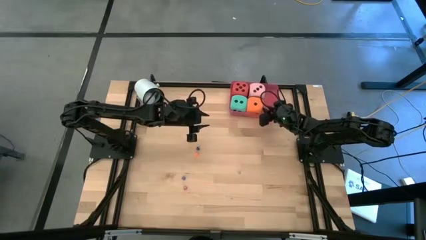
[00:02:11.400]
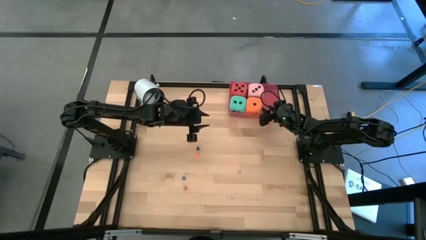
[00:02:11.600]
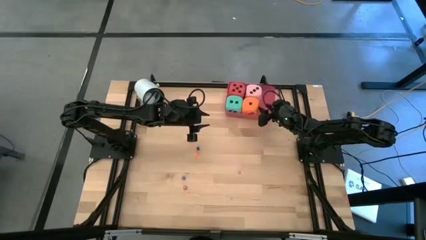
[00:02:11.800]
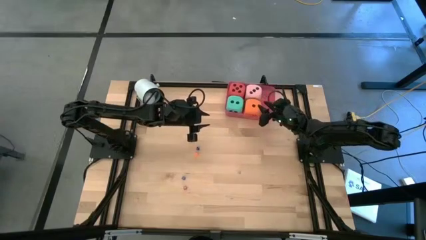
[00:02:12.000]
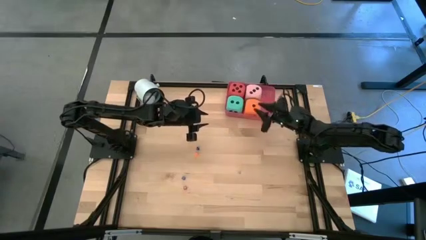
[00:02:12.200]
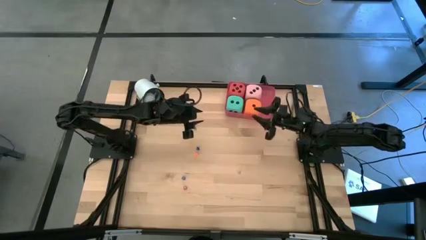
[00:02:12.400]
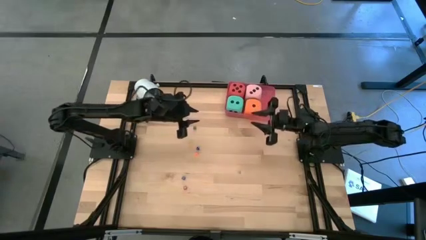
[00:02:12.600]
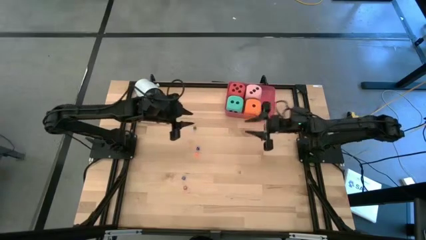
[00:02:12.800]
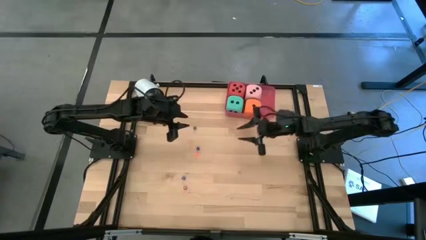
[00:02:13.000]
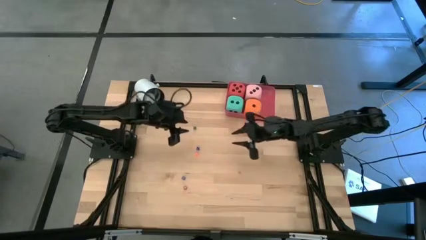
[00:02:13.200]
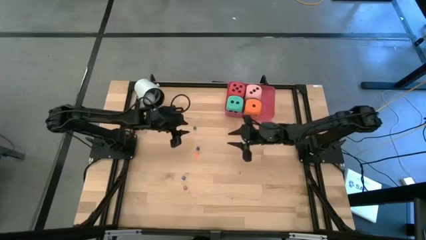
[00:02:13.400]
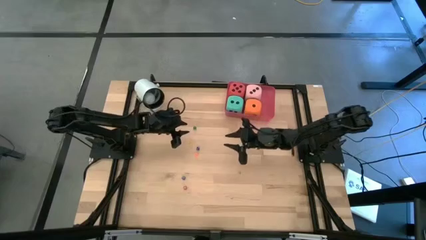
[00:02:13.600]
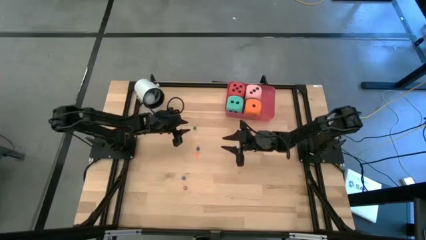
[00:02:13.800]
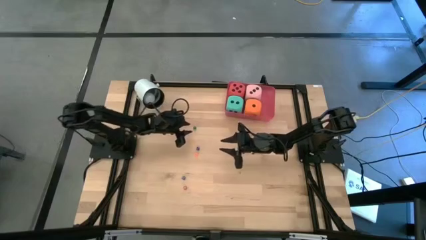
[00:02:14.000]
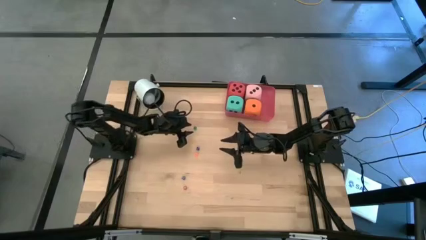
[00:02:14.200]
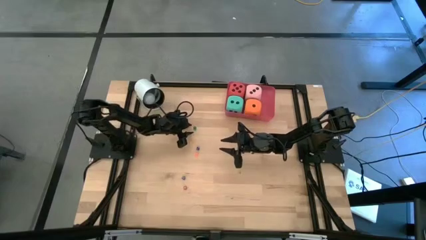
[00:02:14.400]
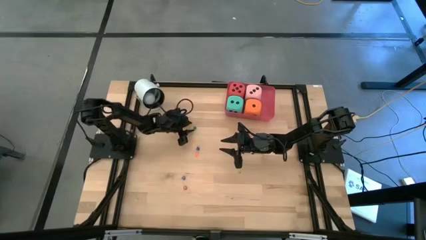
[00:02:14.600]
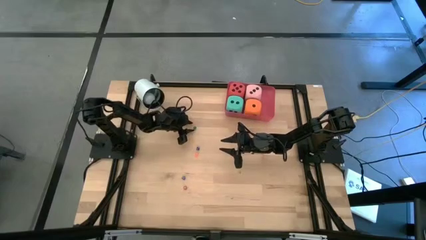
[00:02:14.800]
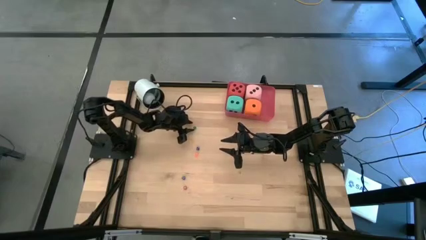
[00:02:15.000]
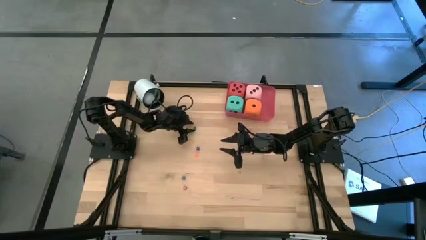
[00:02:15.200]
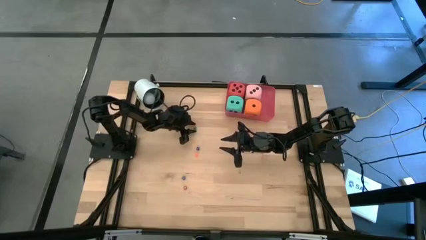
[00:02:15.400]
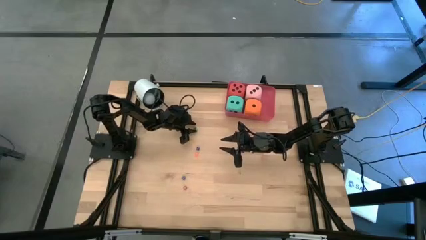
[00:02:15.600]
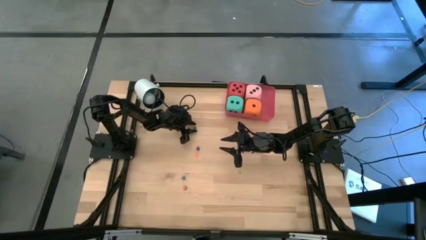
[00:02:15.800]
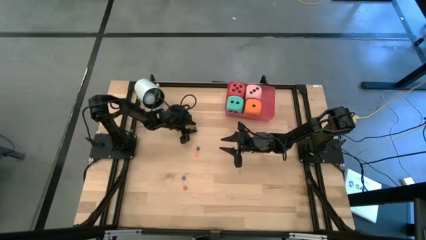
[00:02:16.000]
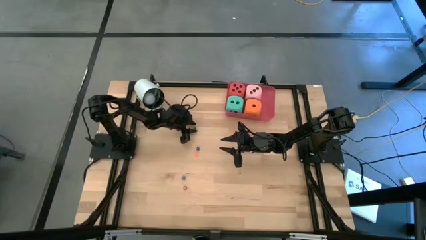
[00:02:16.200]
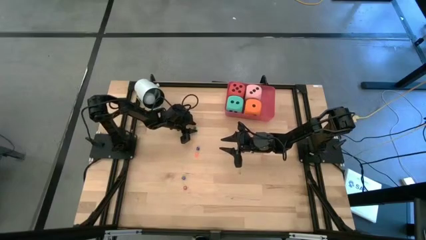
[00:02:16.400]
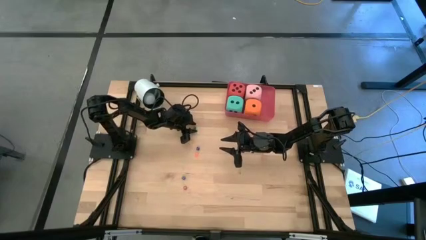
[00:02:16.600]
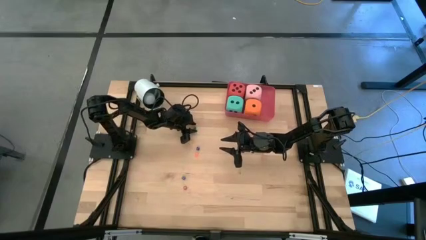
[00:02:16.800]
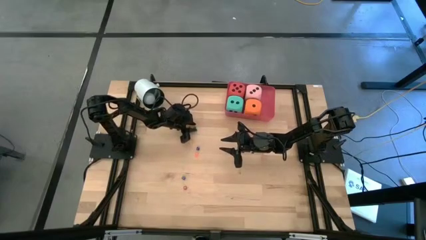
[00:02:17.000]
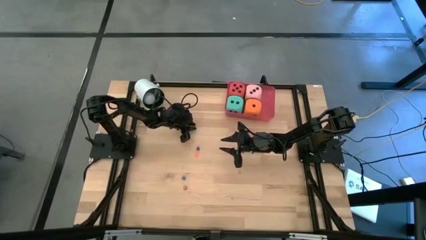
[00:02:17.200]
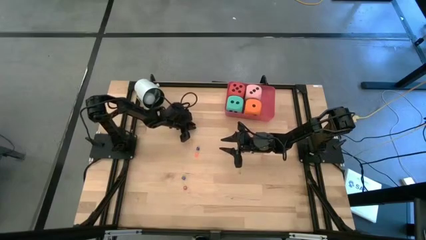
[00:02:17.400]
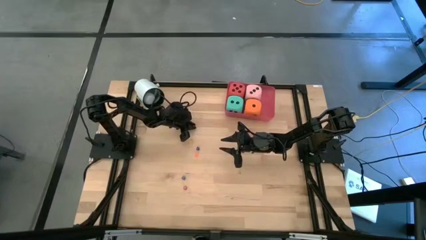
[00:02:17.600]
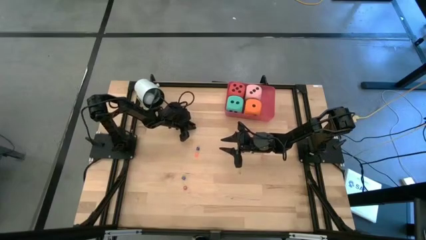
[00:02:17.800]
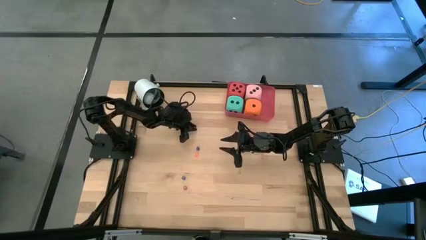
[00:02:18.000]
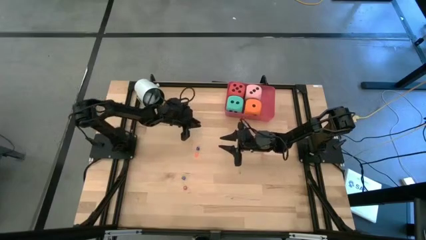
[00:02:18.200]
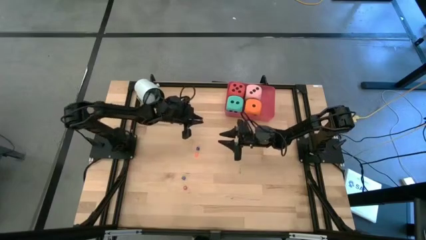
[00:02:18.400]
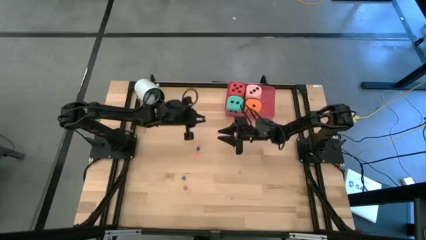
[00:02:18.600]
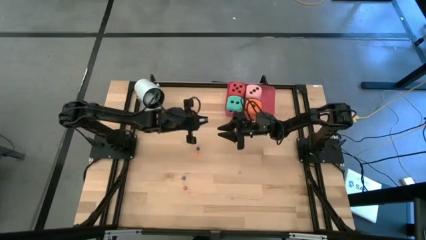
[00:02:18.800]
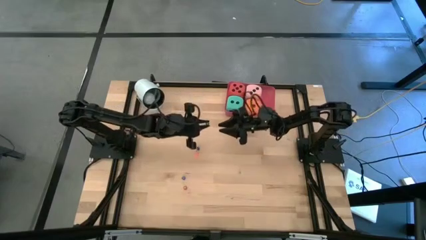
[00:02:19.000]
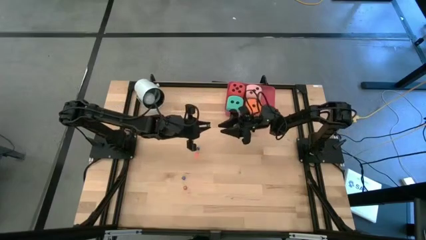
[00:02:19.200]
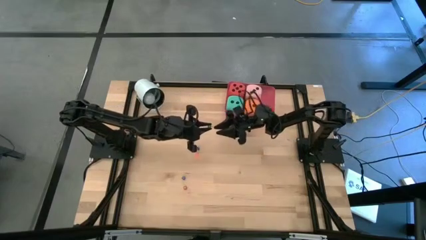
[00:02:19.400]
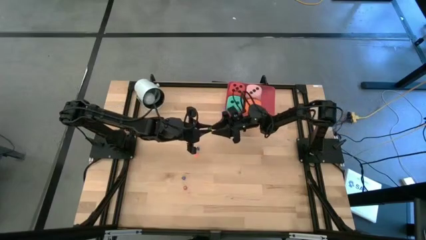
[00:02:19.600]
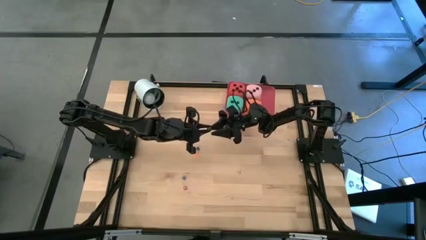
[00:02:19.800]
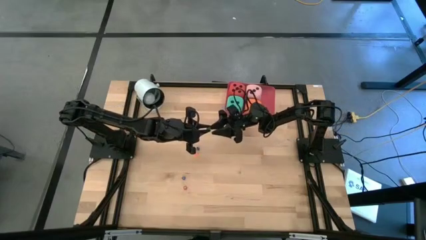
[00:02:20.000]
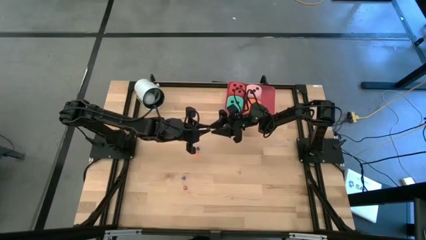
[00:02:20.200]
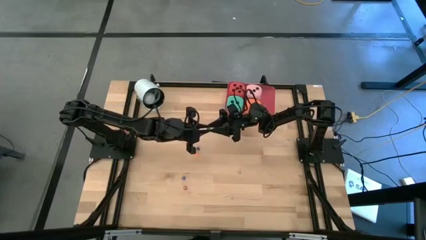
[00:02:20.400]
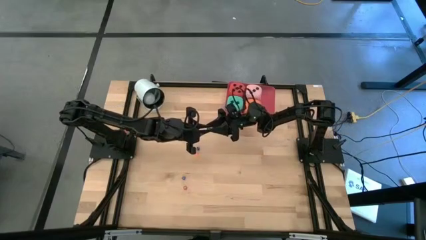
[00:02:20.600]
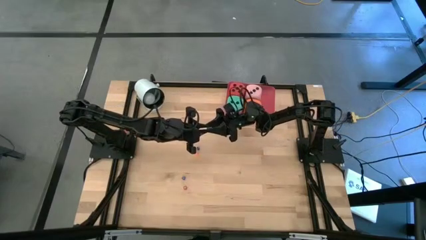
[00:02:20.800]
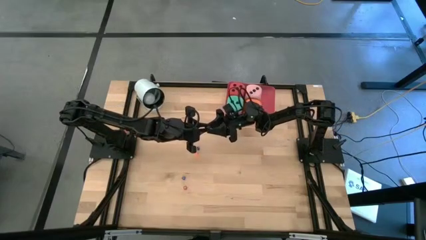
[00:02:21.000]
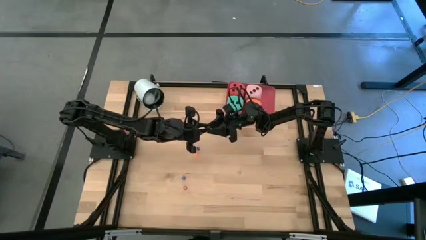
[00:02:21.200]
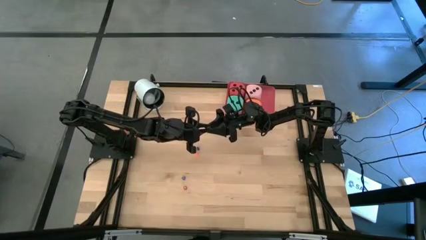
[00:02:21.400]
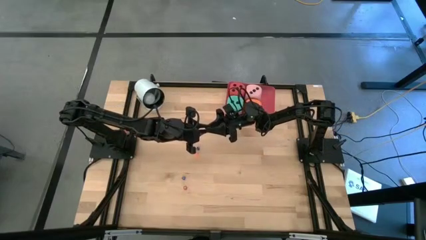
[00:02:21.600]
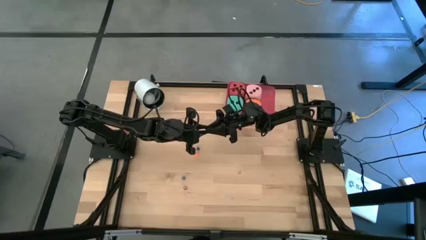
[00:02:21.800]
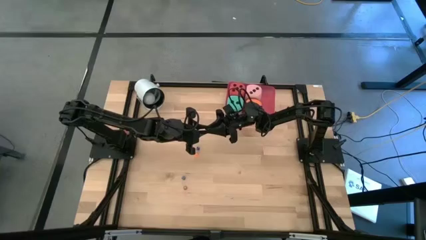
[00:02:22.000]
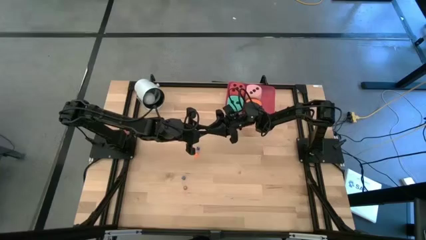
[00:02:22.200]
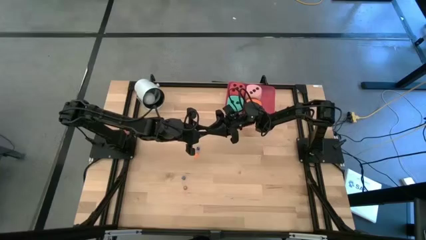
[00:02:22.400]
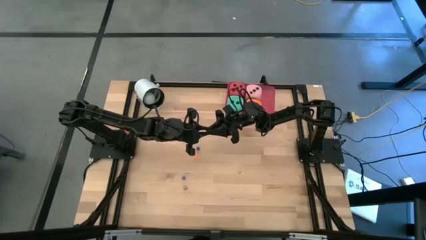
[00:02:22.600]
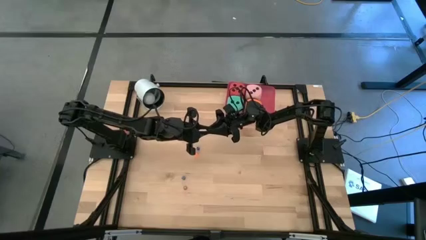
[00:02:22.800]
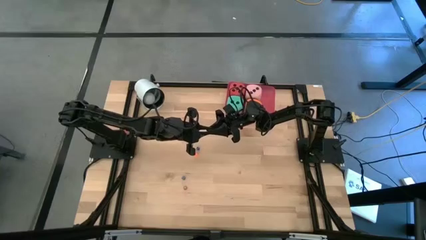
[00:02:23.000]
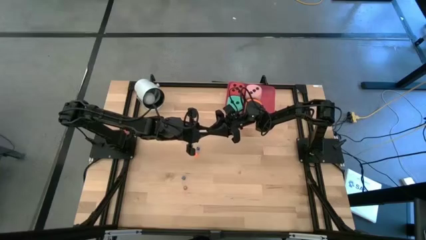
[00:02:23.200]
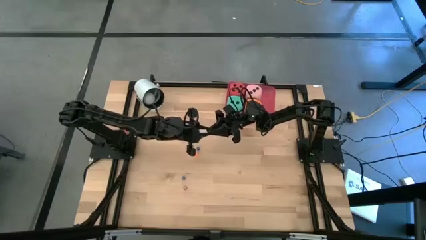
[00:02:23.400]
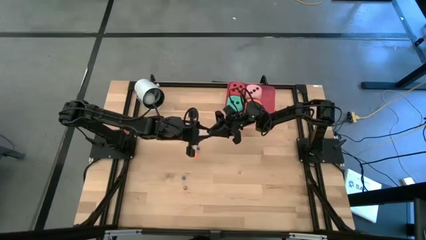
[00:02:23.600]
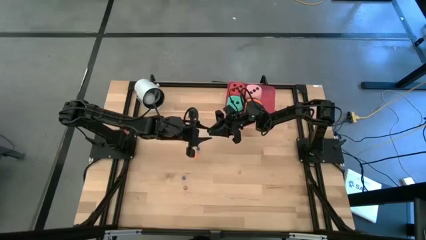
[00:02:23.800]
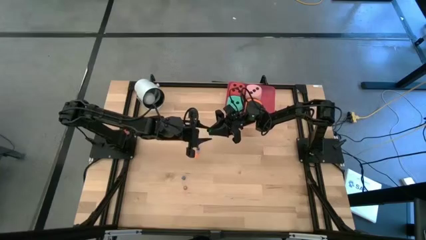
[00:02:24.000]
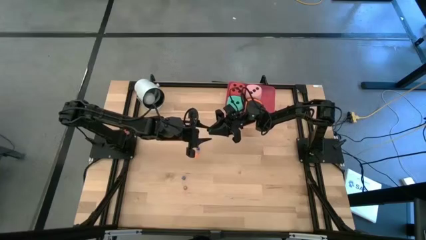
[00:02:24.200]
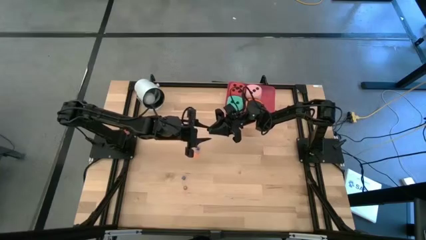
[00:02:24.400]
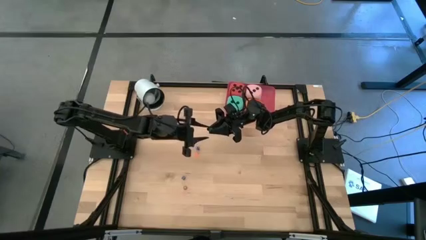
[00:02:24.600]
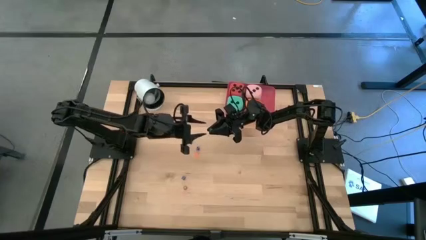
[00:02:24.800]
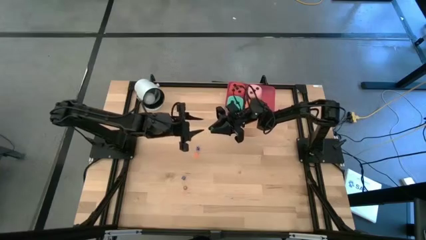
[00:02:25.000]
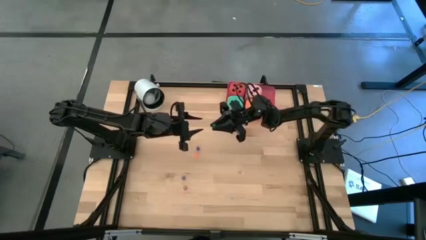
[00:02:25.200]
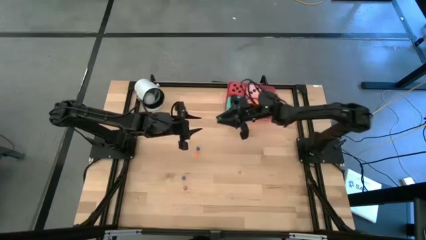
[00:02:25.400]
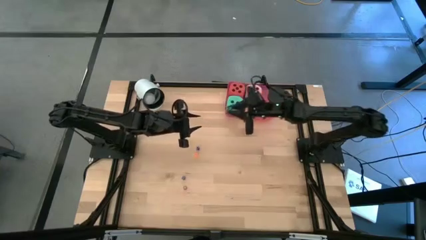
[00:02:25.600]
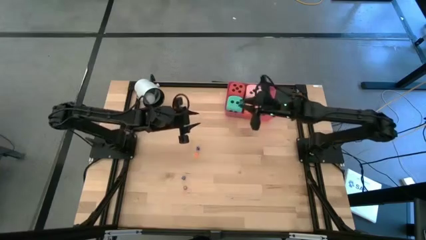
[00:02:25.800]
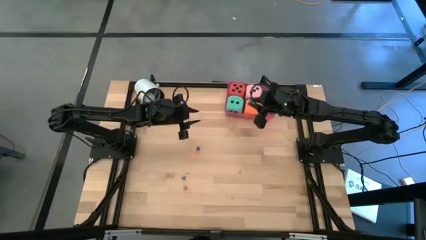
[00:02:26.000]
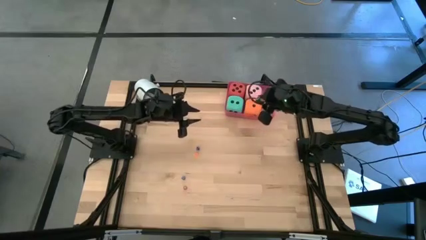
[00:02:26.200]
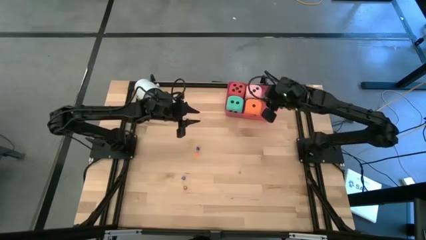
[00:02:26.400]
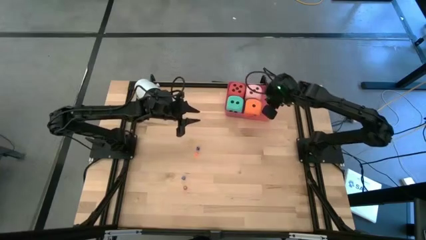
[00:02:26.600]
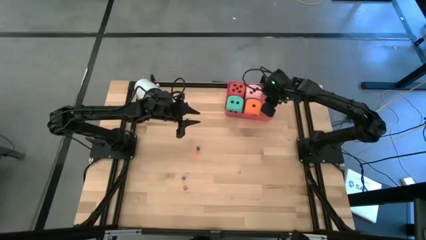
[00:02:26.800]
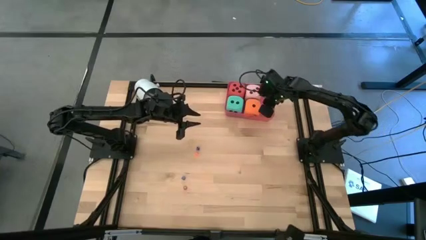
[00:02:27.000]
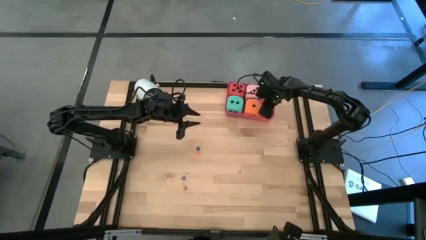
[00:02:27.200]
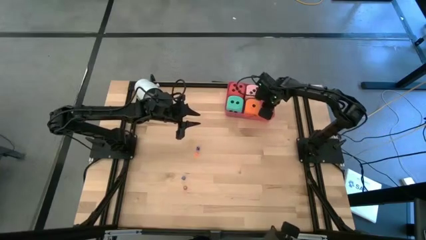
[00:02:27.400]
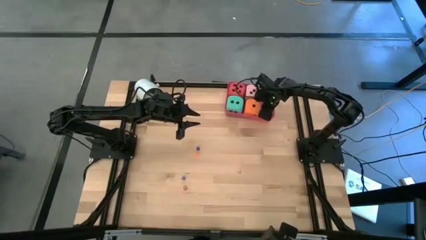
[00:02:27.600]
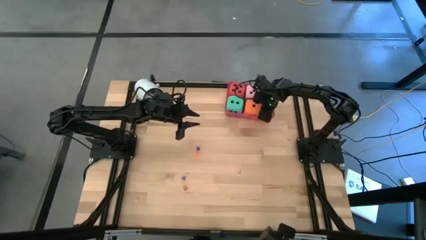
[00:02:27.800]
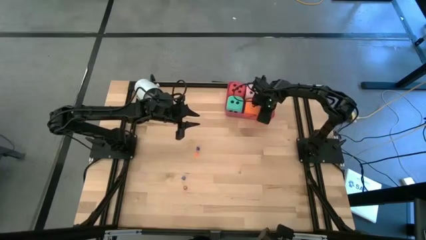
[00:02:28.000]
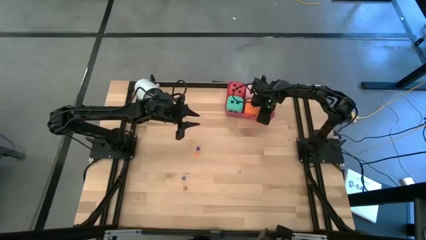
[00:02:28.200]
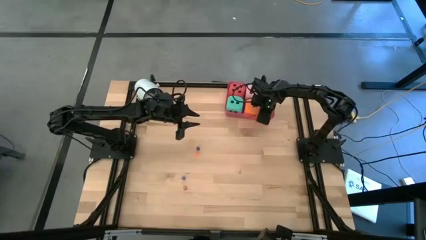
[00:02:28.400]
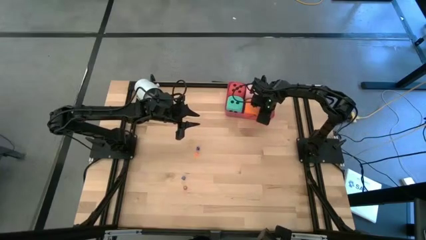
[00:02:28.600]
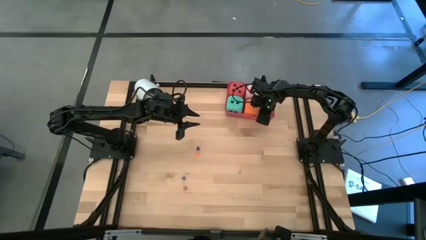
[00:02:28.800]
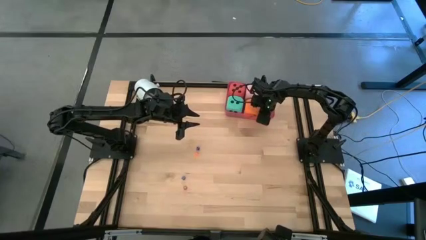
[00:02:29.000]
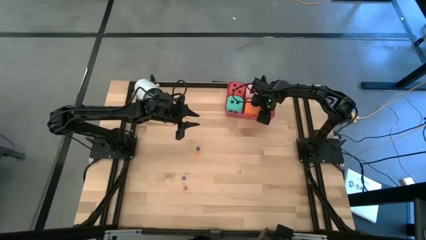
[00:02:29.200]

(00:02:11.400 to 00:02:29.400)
Task: Pick & Place Dice
Put the small green dice into the red bin
